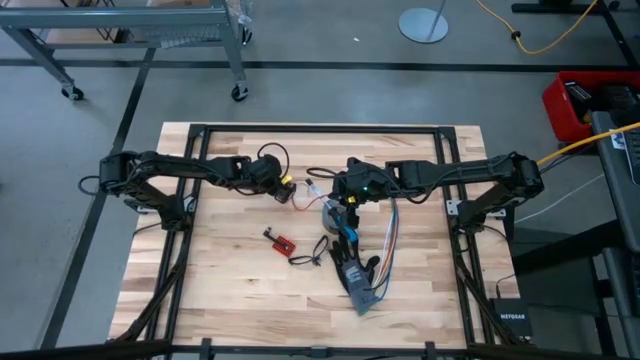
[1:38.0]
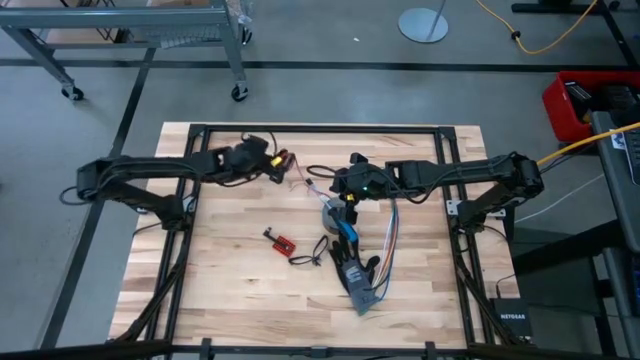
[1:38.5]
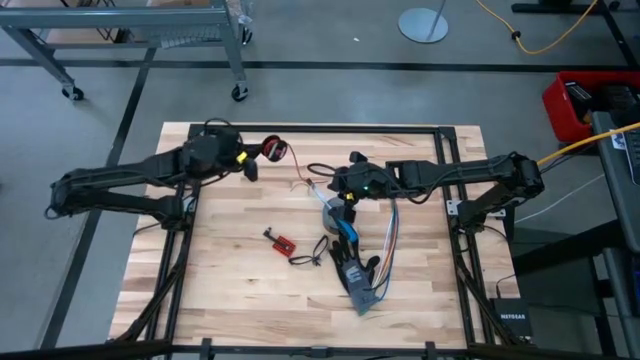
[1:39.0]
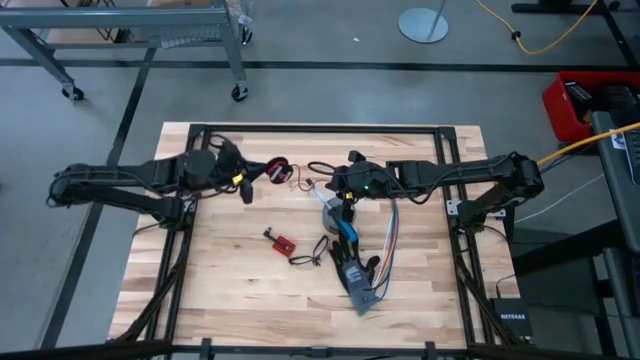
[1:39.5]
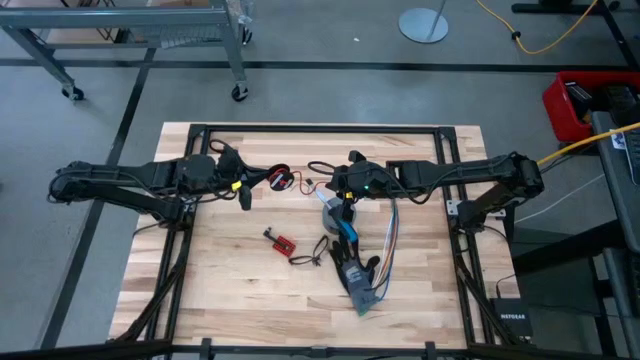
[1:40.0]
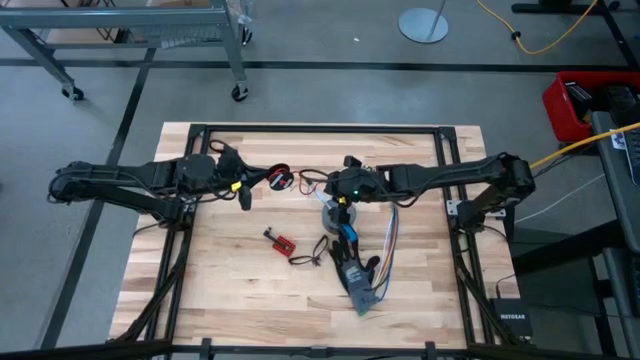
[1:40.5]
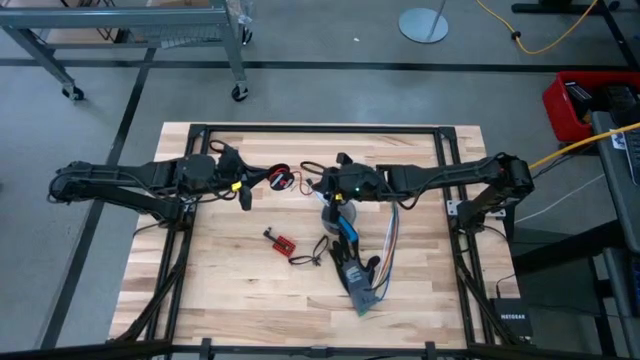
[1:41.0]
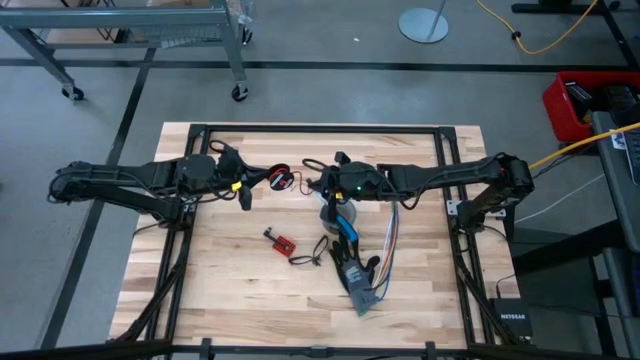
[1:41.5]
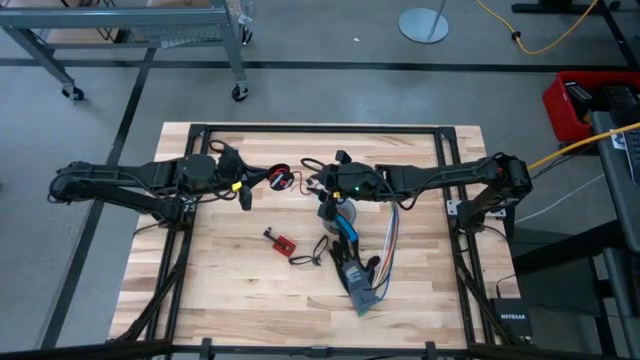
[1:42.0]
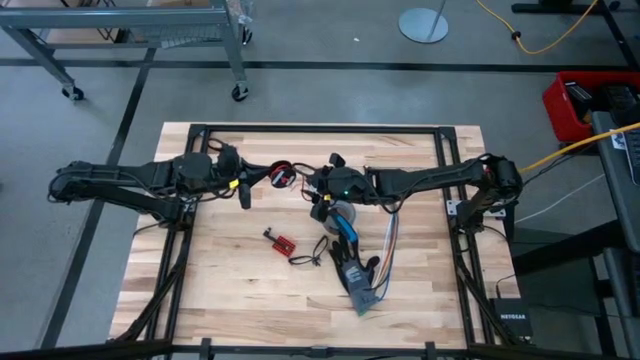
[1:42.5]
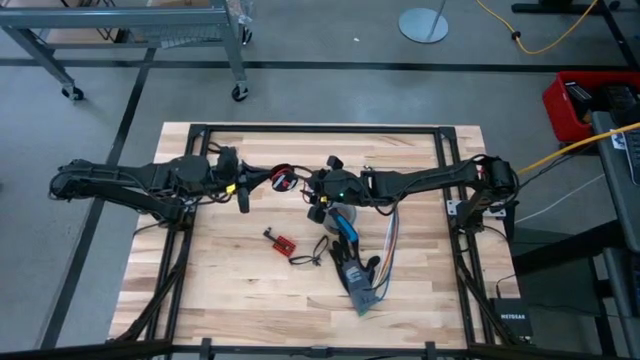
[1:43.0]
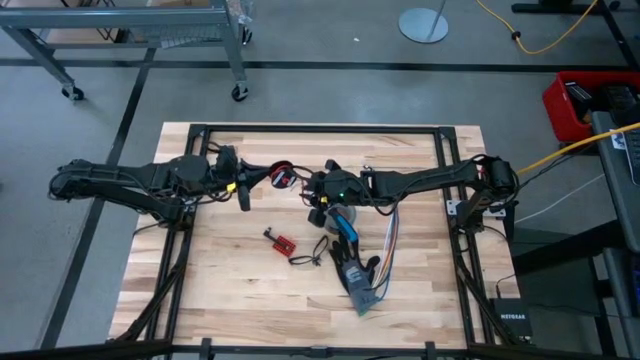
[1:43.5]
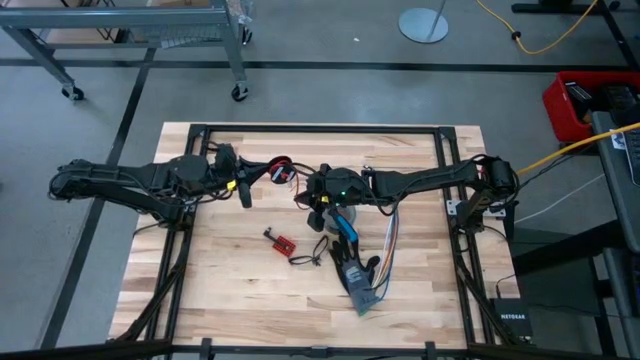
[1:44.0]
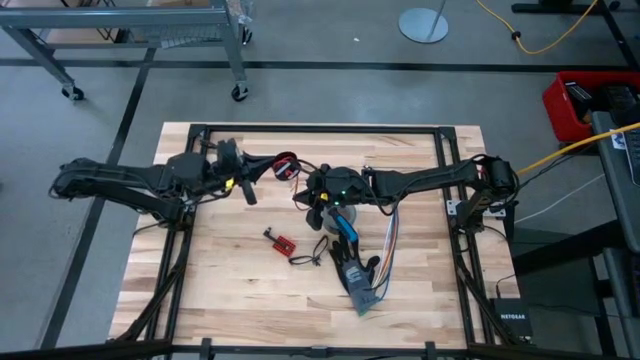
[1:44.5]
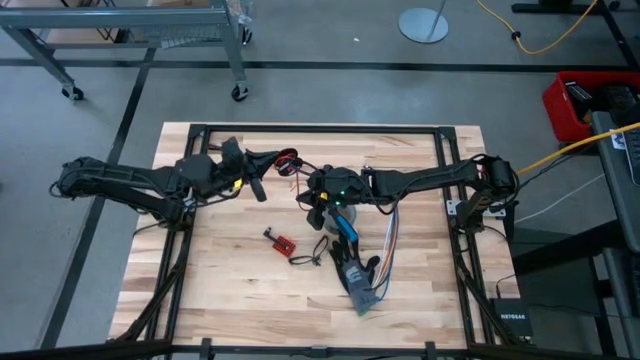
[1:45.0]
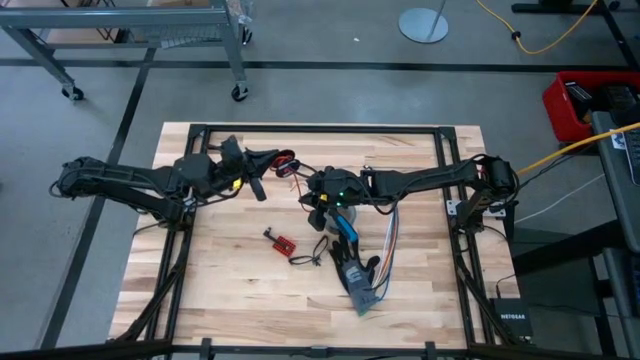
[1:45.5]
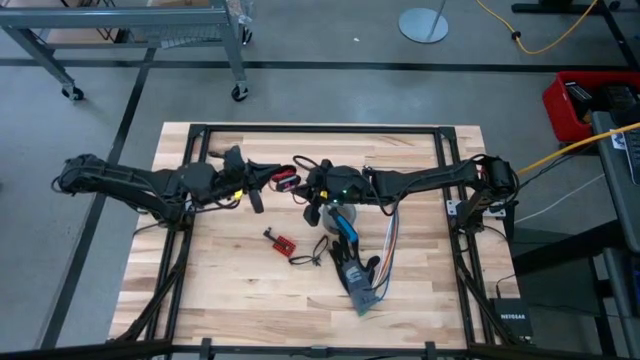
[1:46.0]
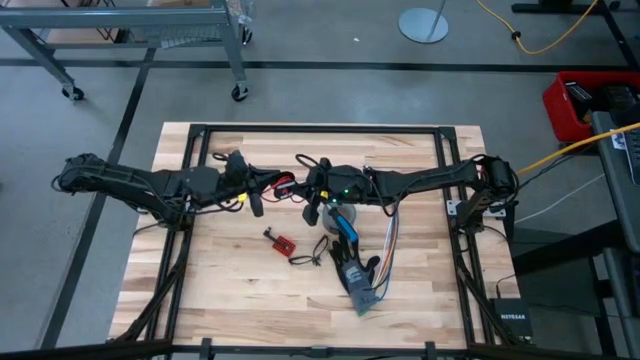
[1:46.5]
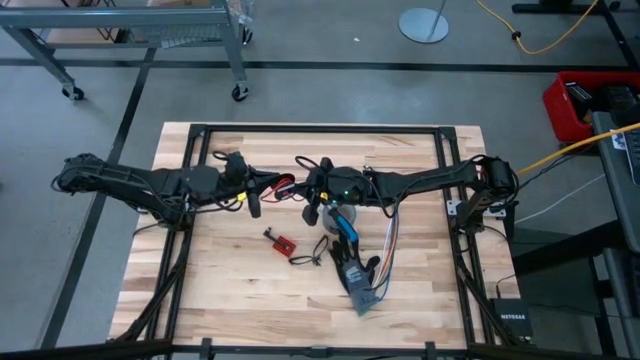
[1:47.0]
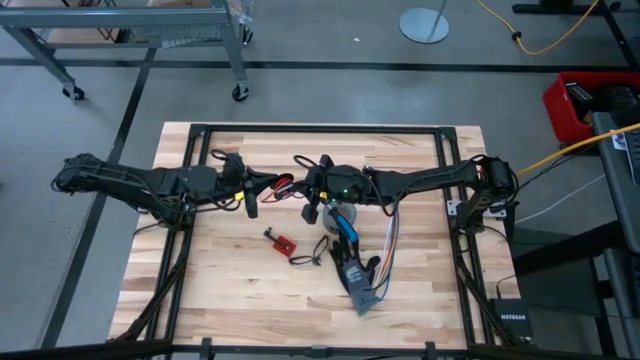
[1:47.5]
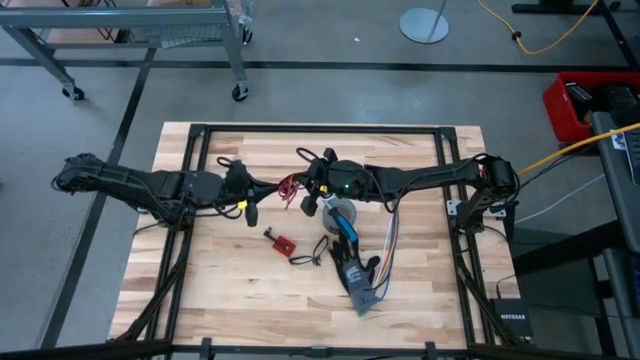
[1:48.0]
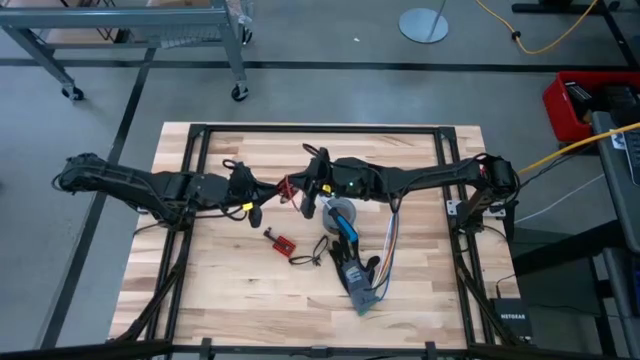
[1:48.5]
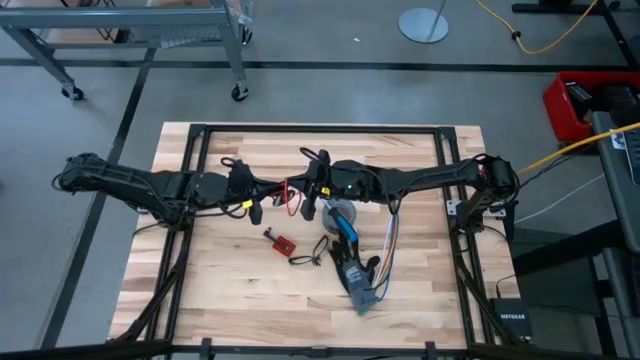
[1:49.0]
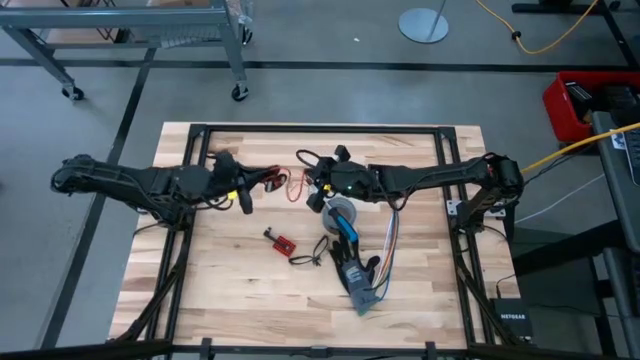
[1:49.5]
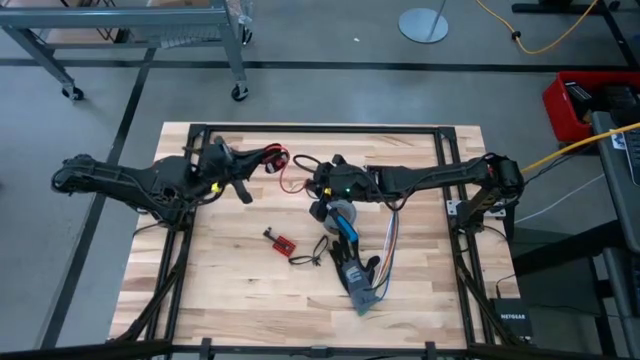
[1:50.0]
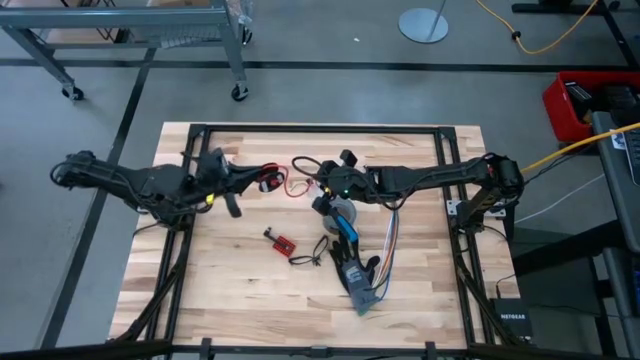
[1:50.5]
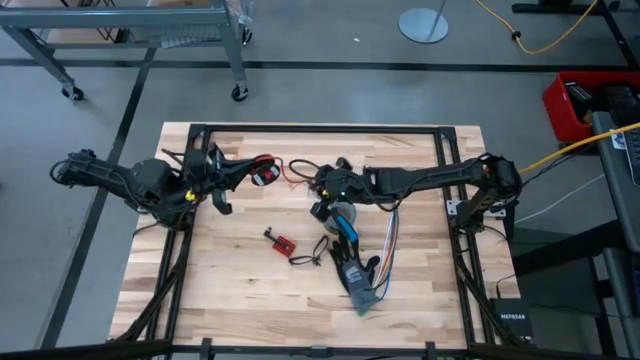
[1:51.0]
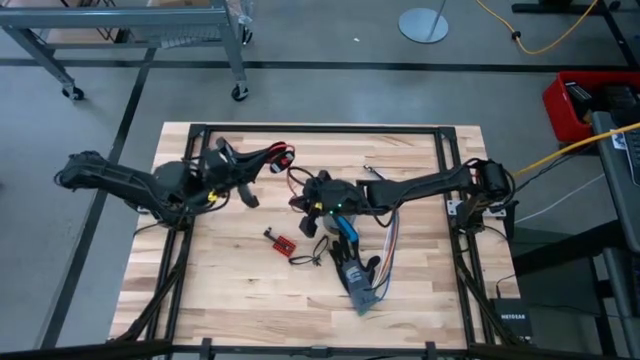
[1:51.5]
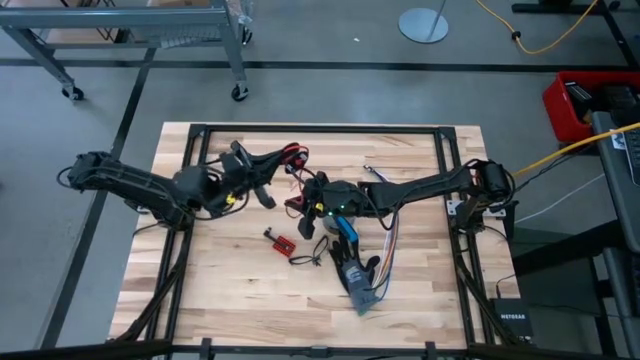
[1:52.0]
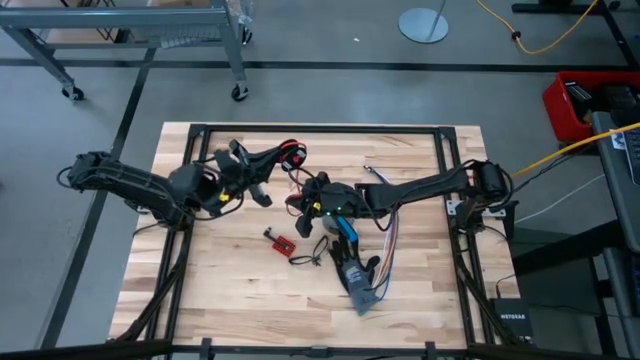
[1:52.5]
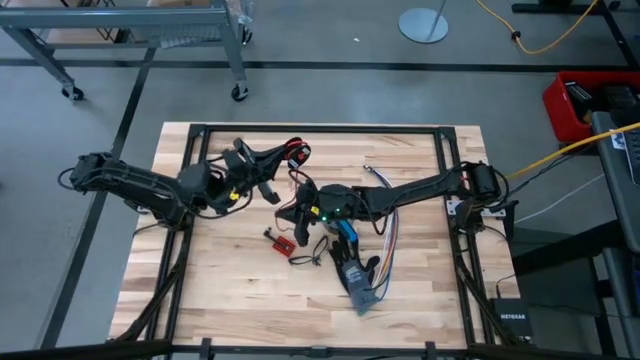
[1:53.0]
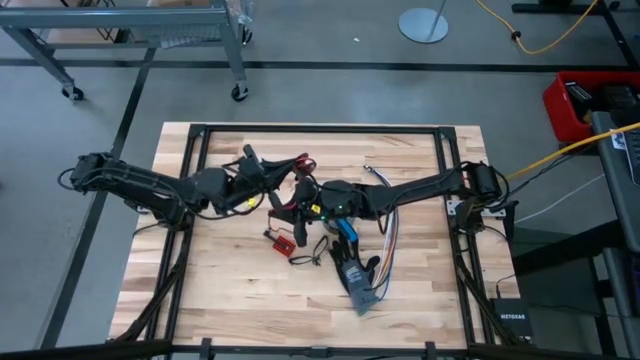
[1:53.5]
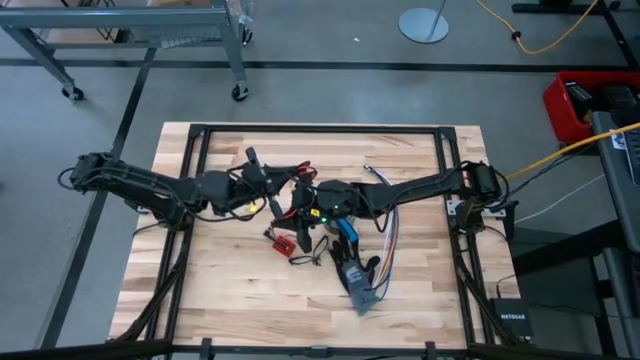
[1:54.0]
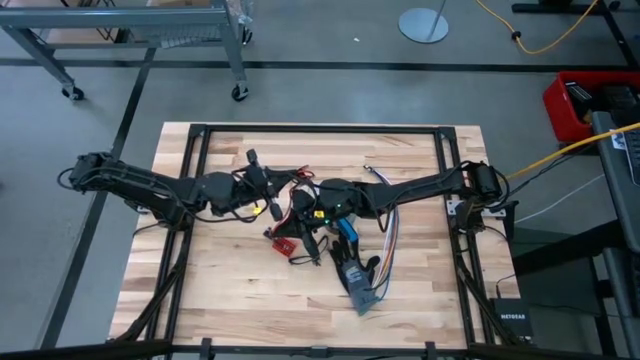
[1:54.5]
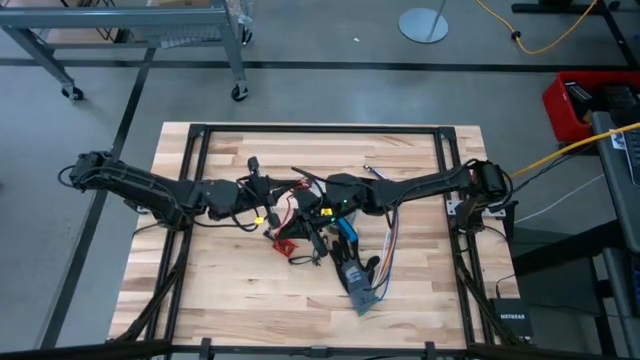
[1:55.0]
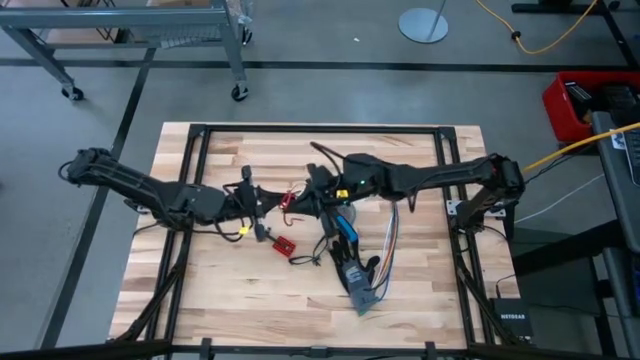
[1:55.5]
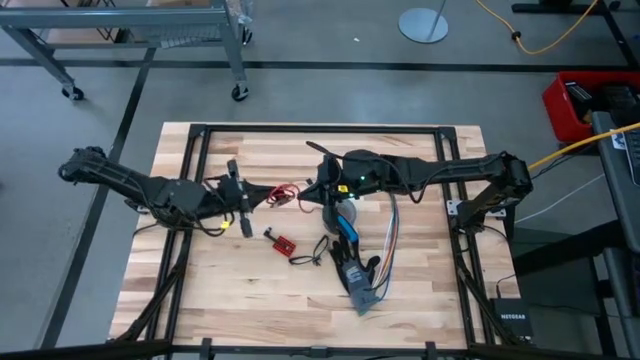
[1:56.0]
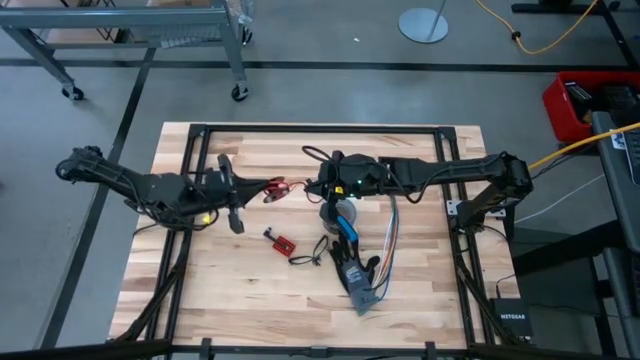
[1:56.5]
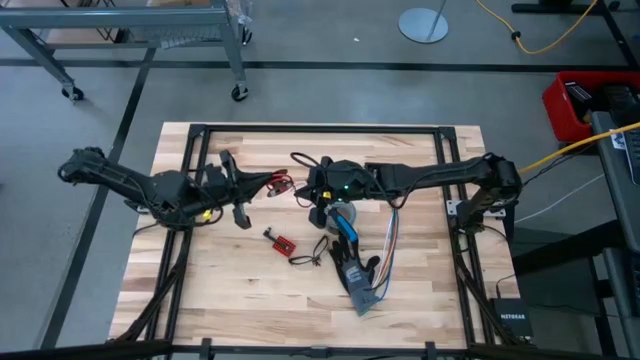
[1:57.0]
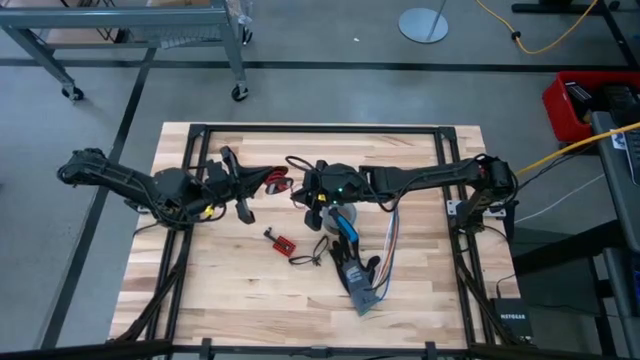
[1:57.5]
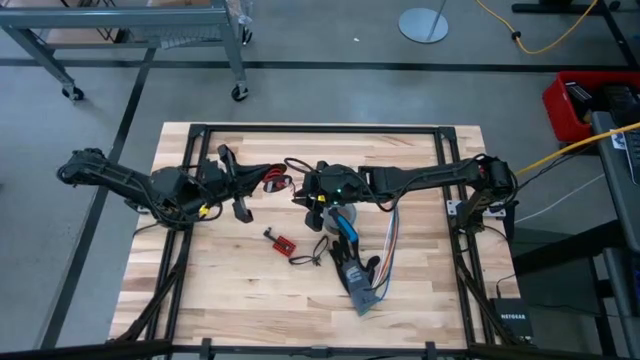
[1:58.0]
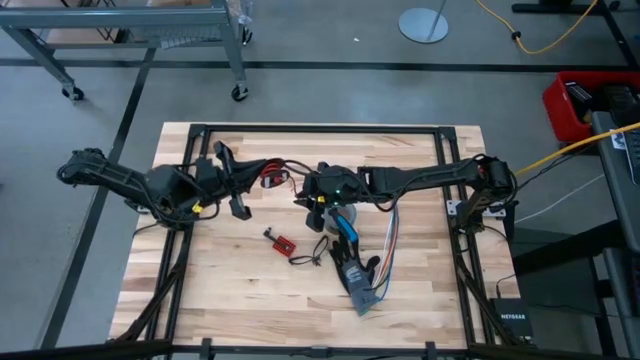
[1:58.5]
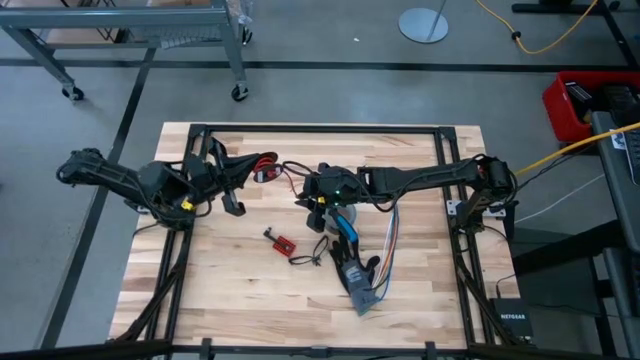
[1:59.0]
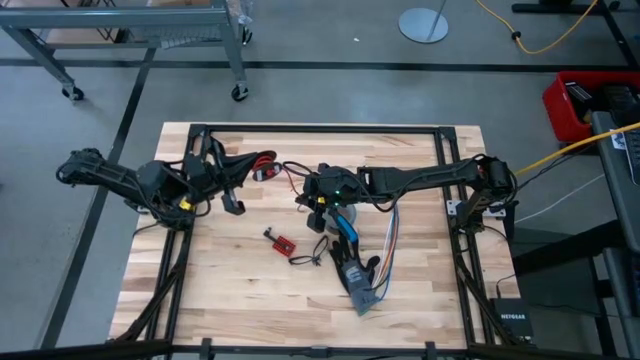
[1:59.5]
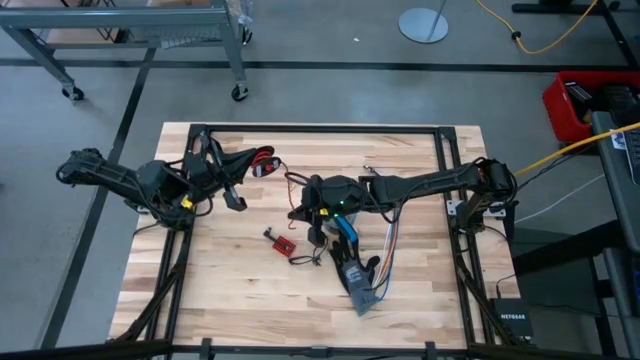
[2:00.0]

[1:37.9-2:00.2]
Task: Coil cords
Coil the red wire around the spool
